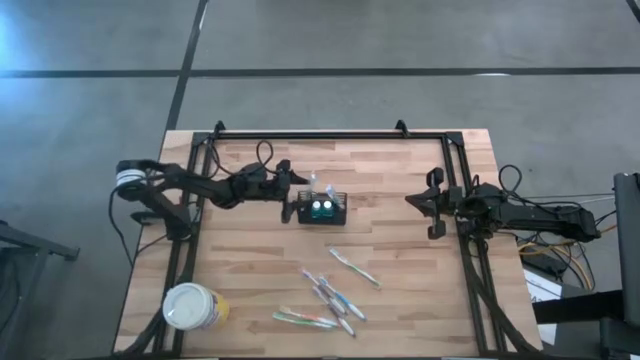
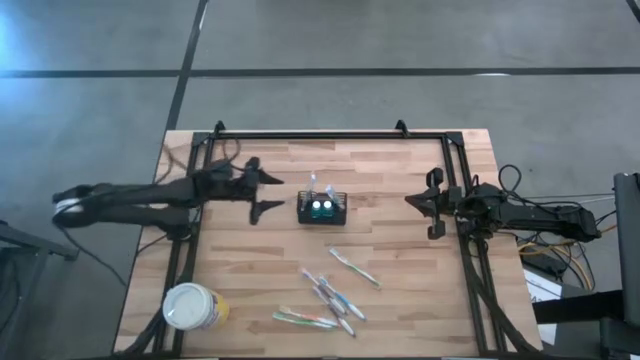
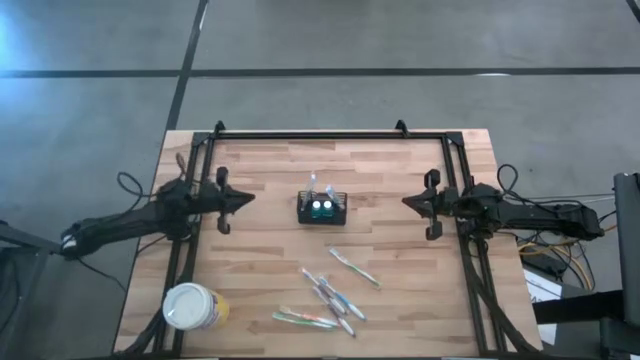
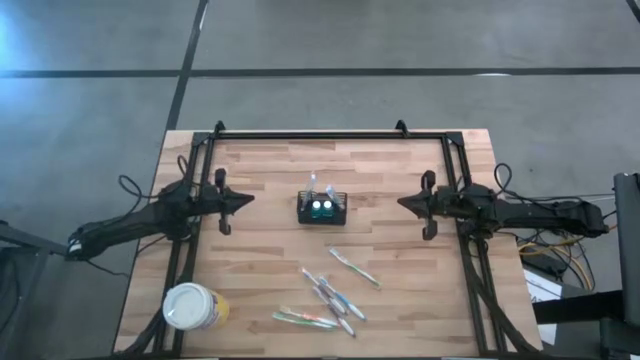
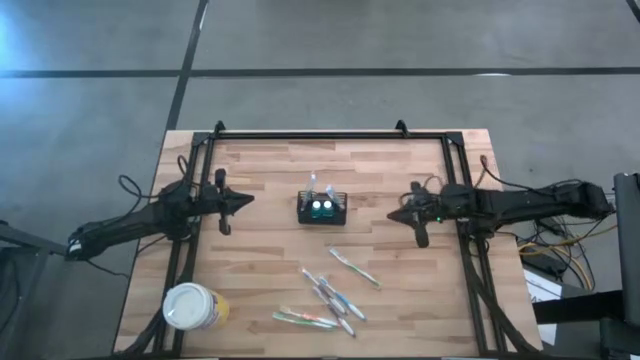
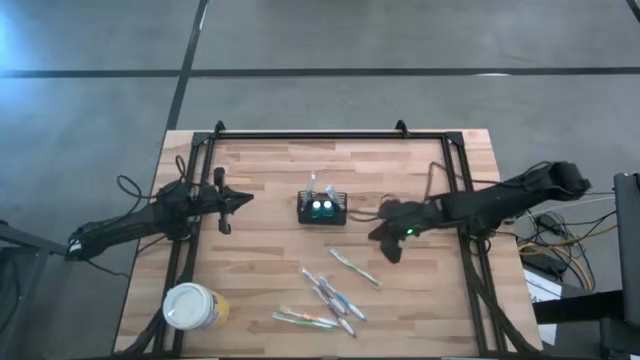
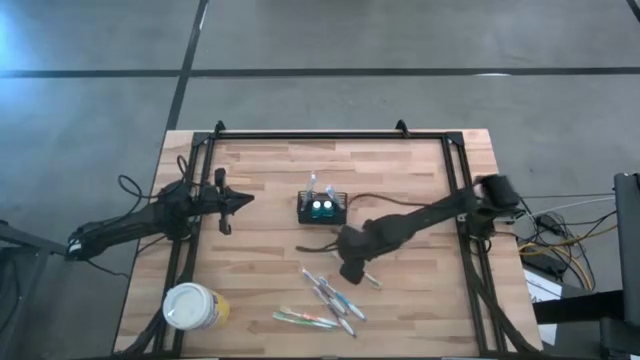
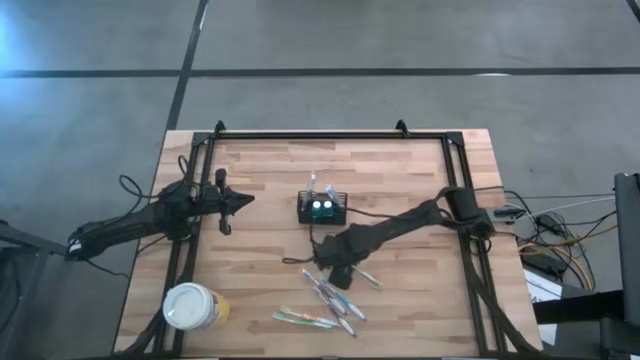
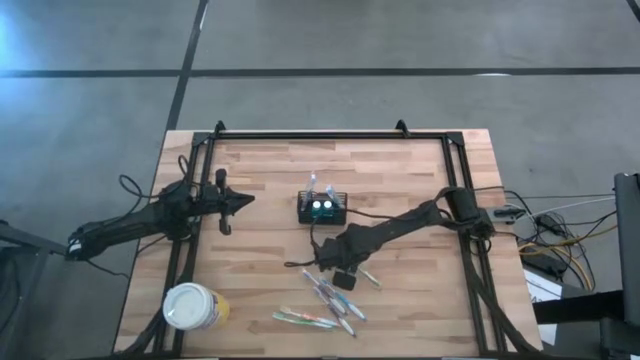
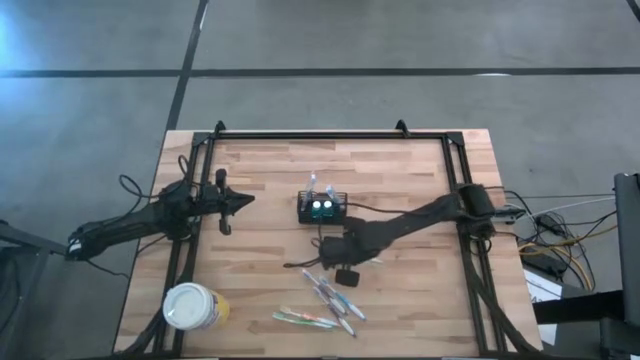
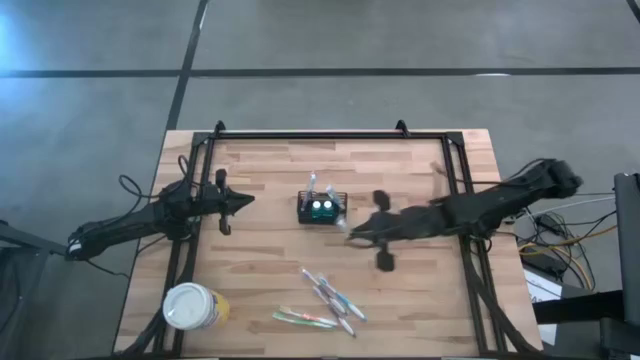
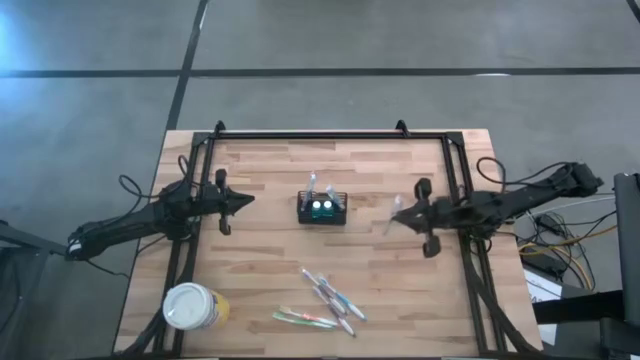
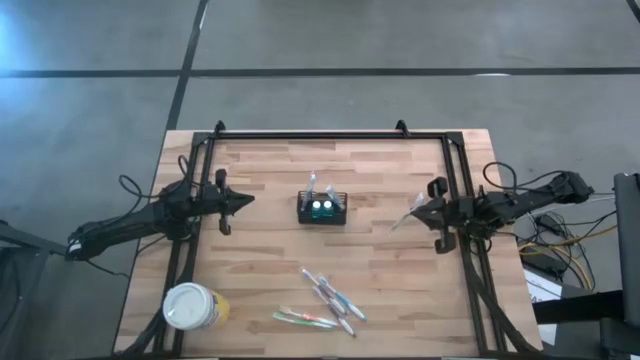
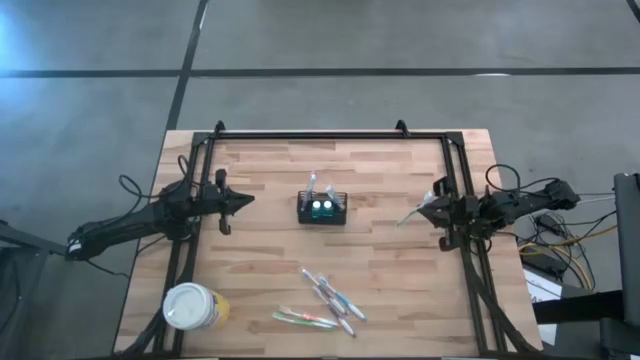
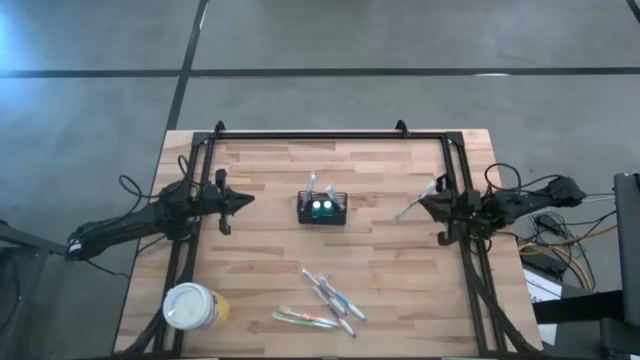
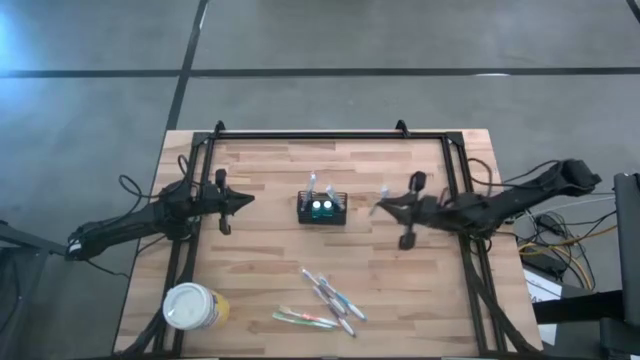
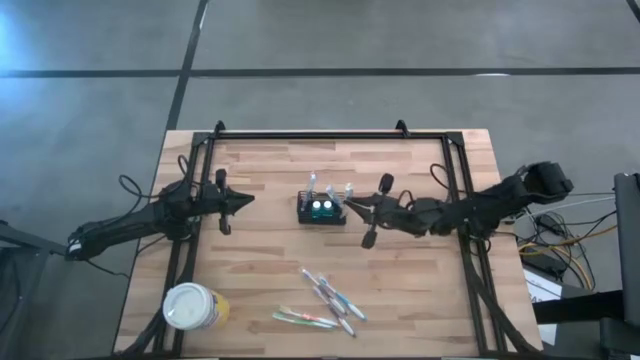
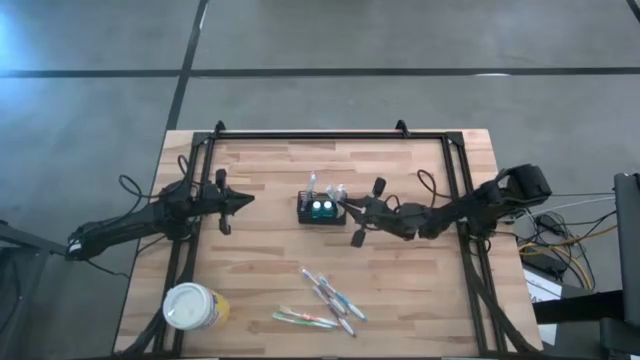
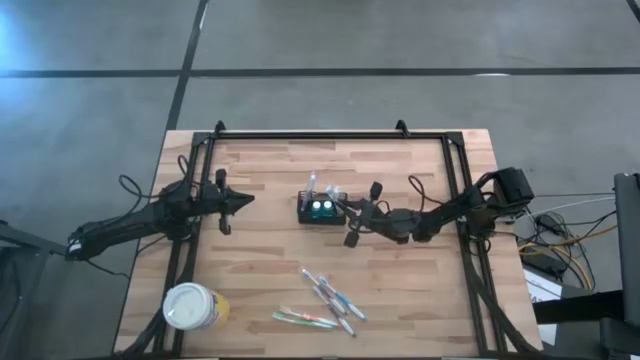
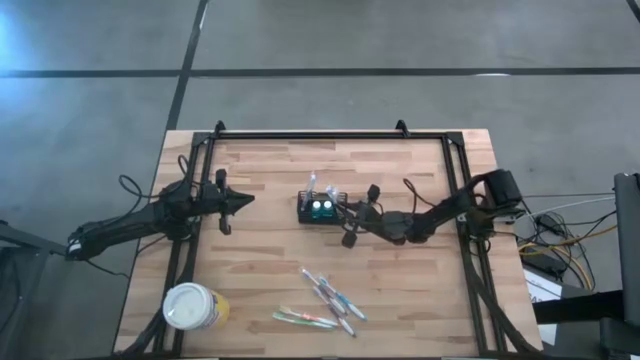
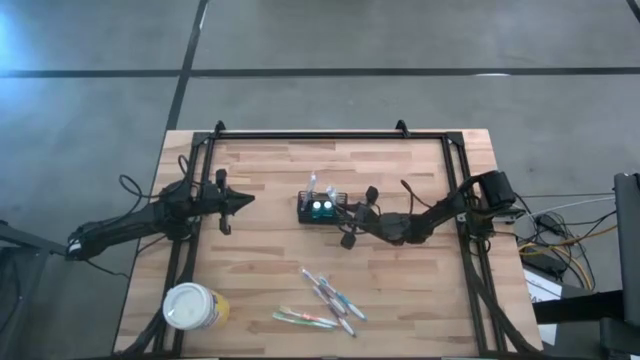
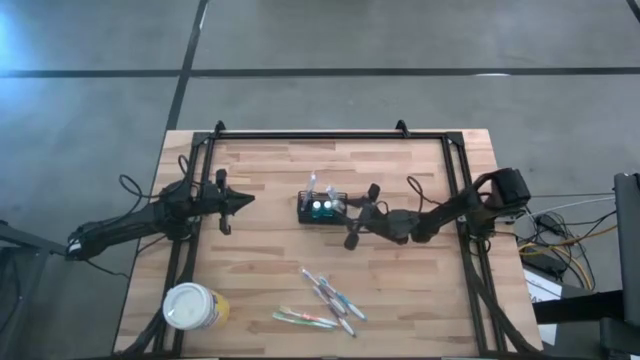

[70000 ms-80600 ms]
Task: Pick & Place toothbrushing station
Put the green toothbrush into the wire organizer

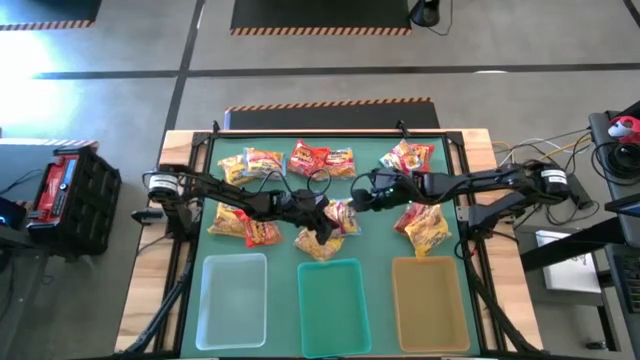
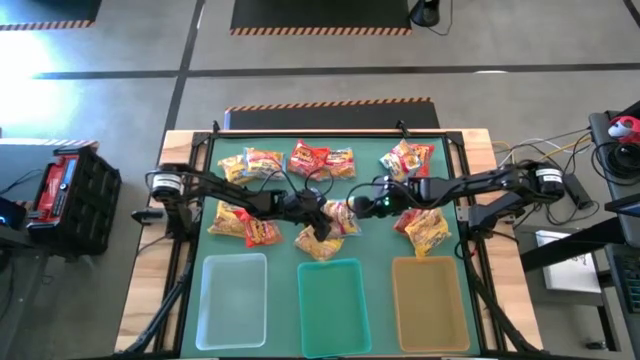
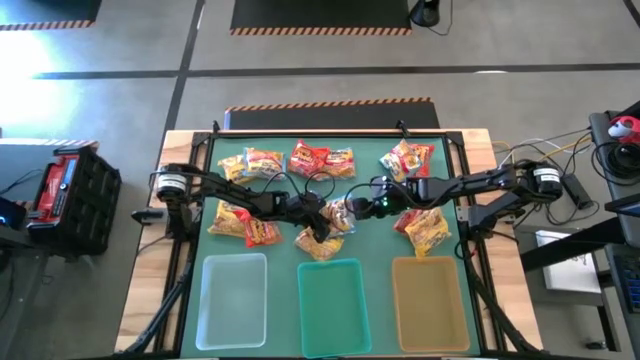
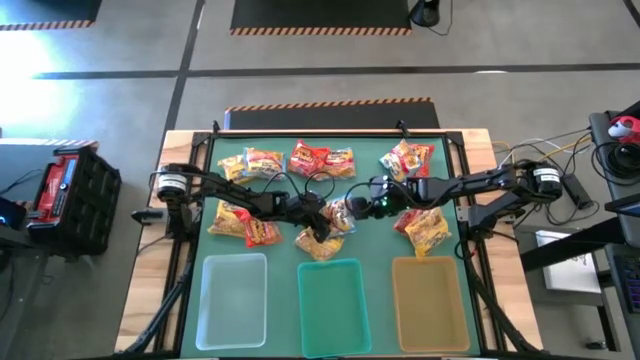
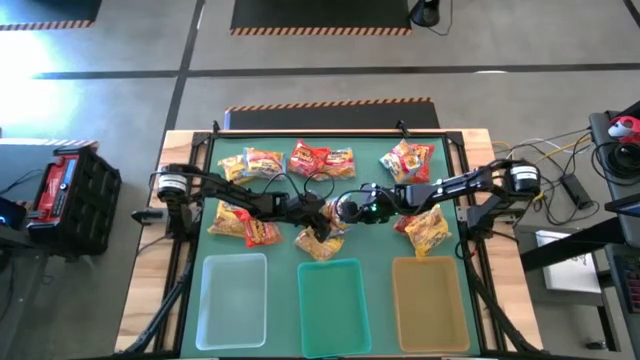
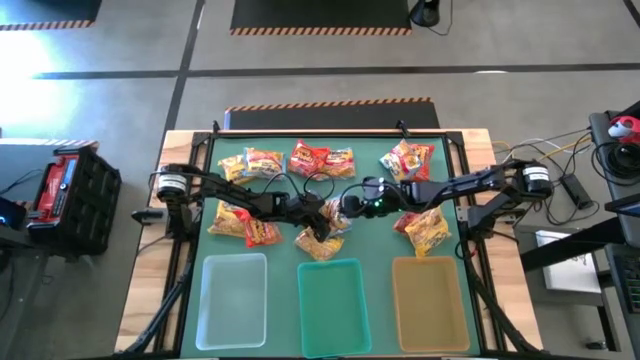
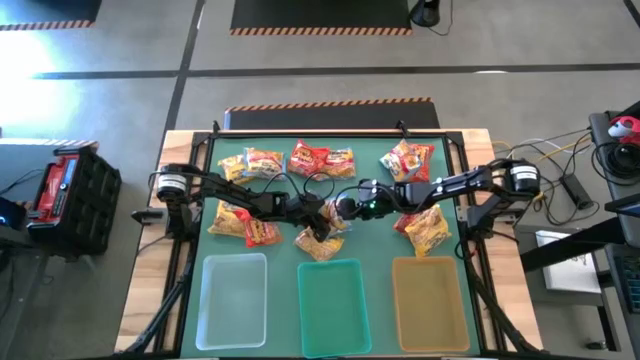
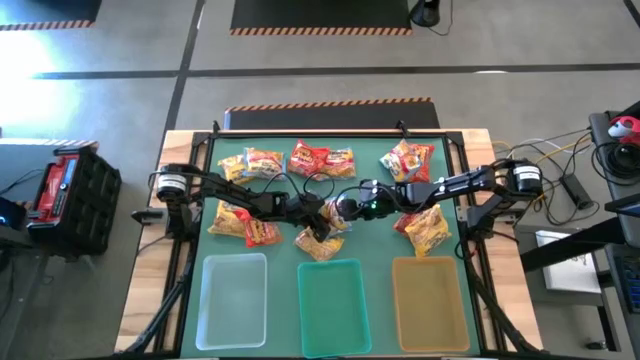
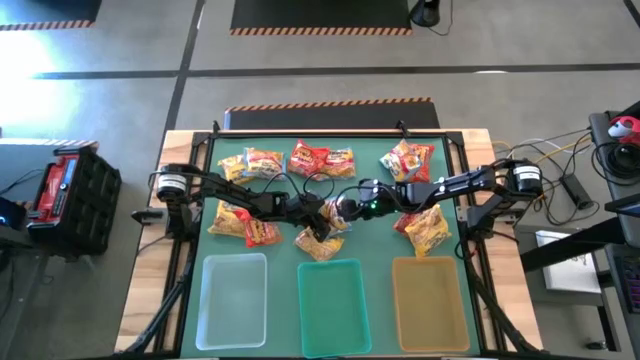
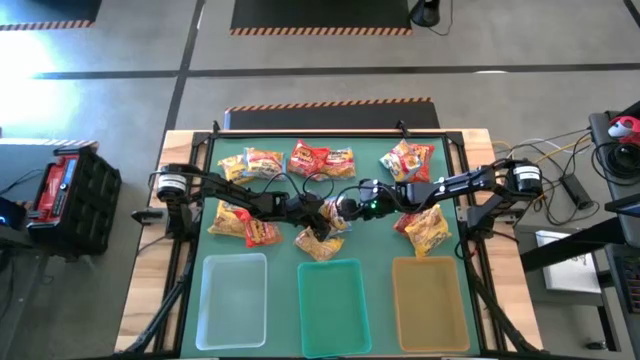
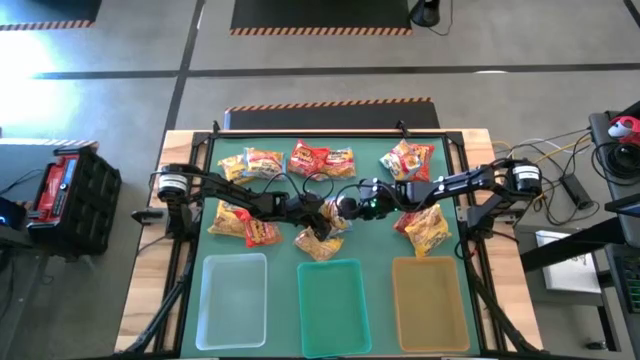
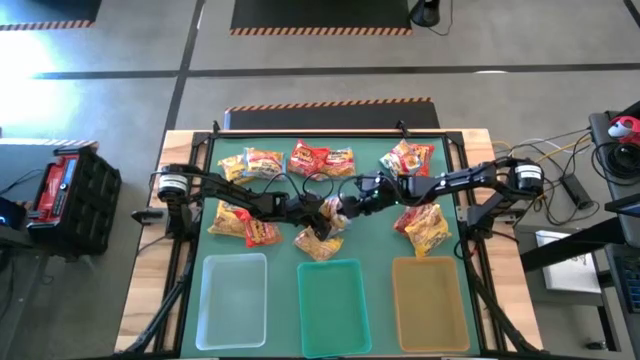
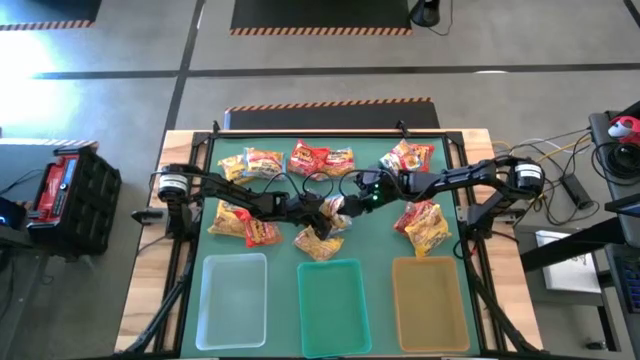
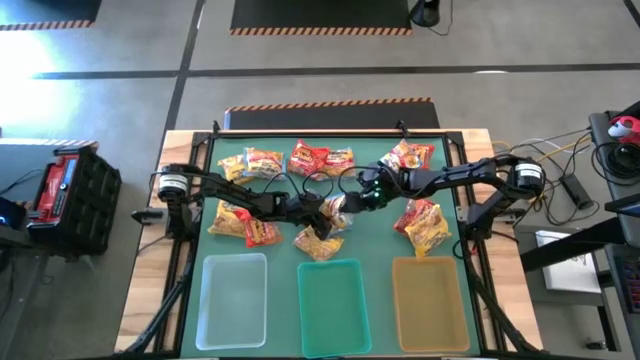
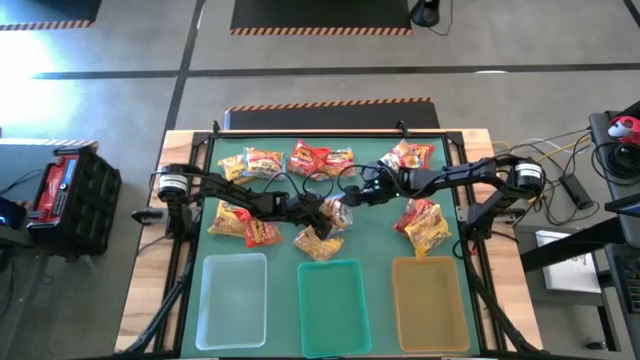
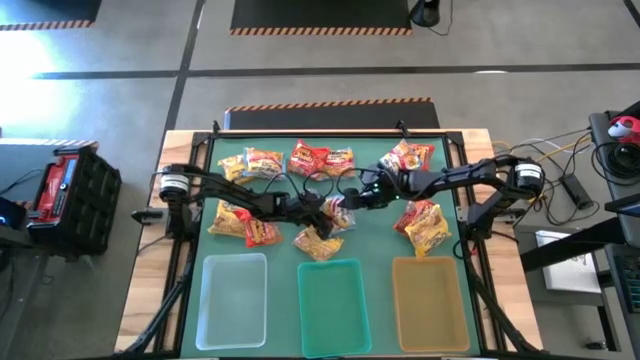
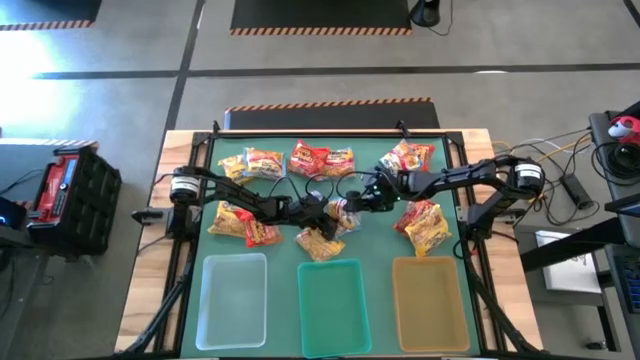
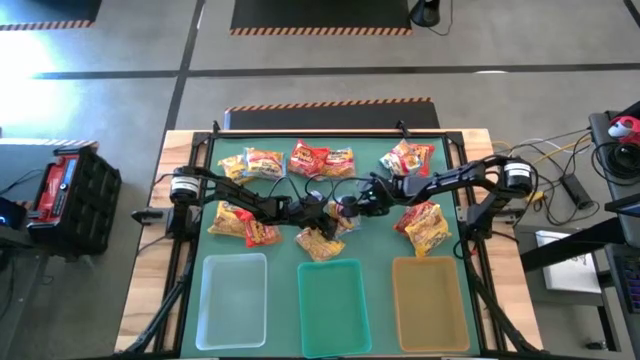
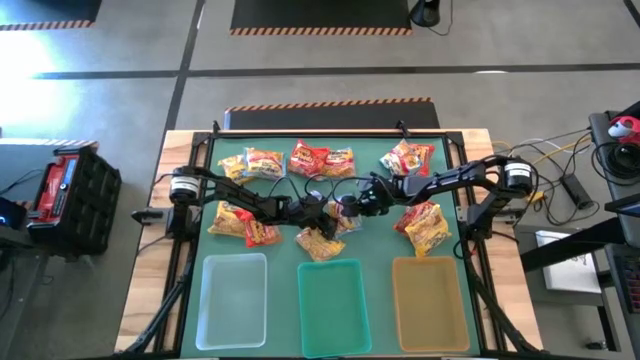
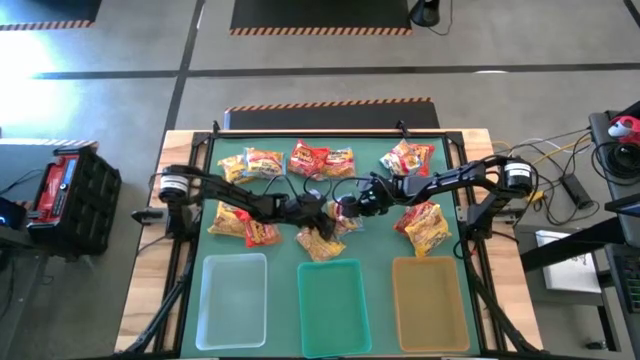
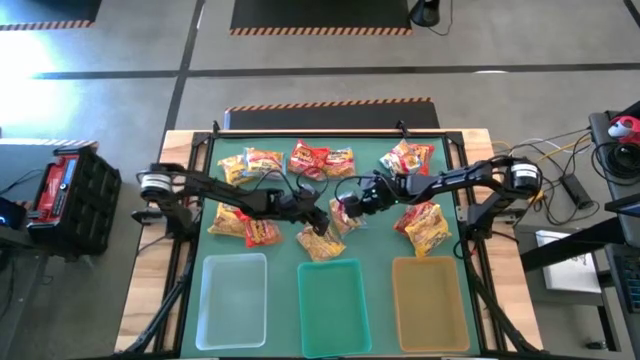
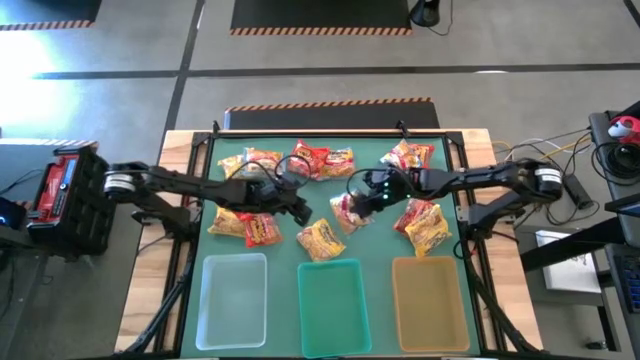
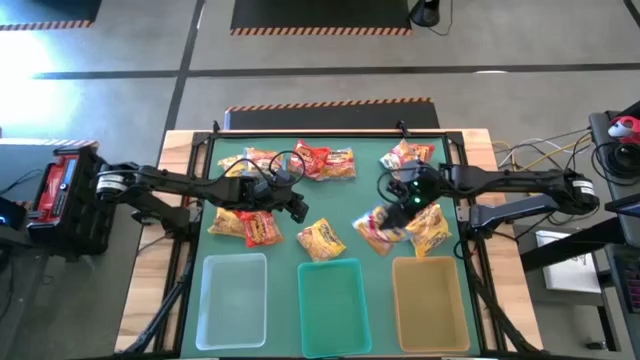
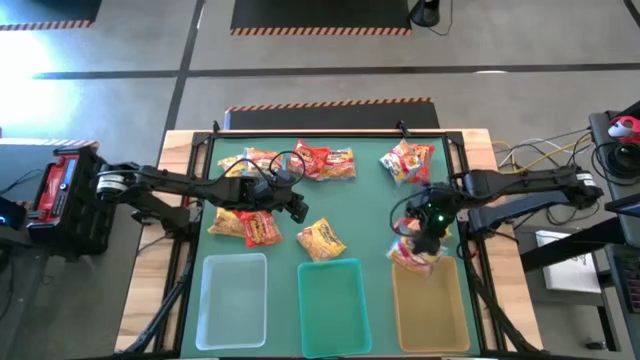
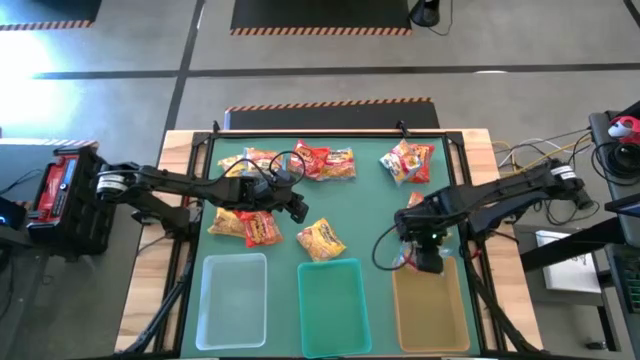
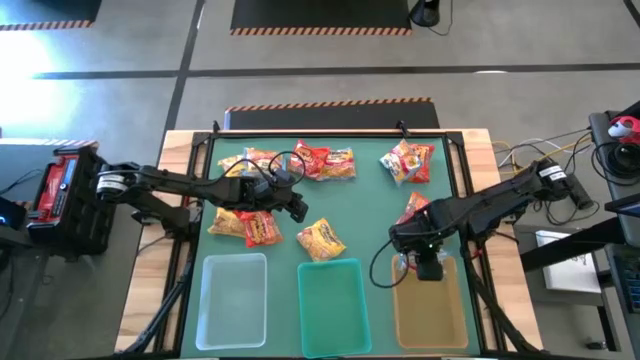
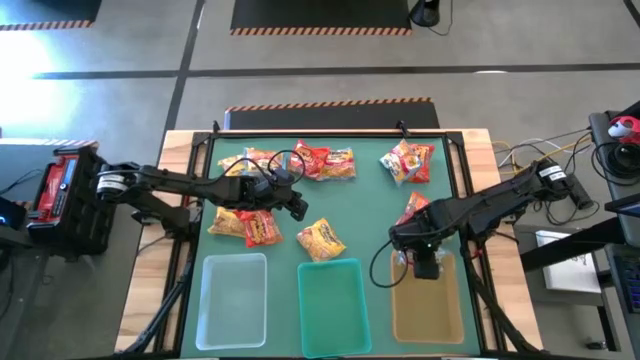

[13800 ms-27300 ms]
Task: Sort Maruchan noodles
Put the blue noodle pack into the yellow bin
